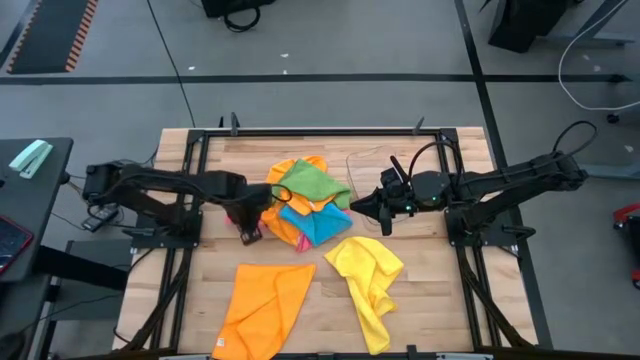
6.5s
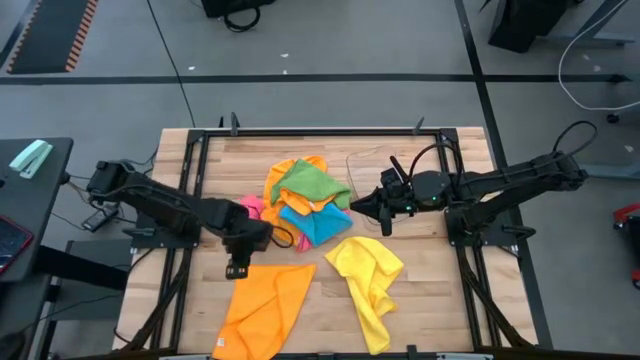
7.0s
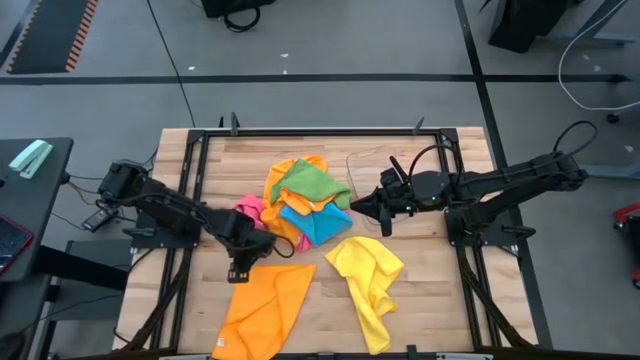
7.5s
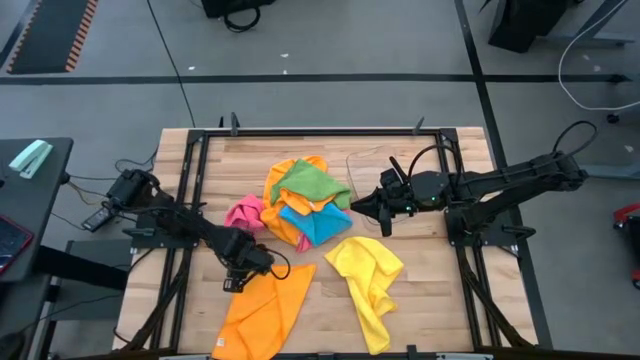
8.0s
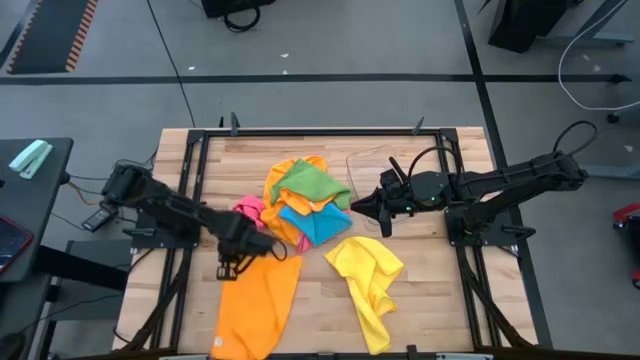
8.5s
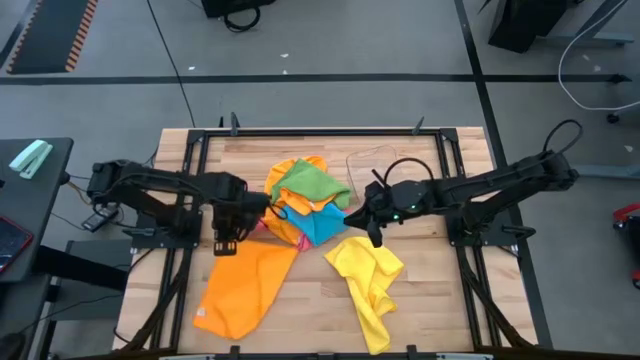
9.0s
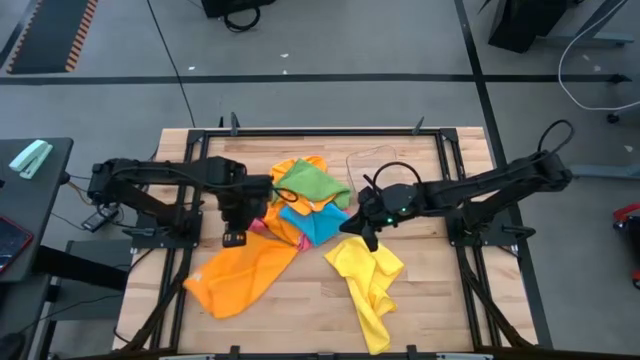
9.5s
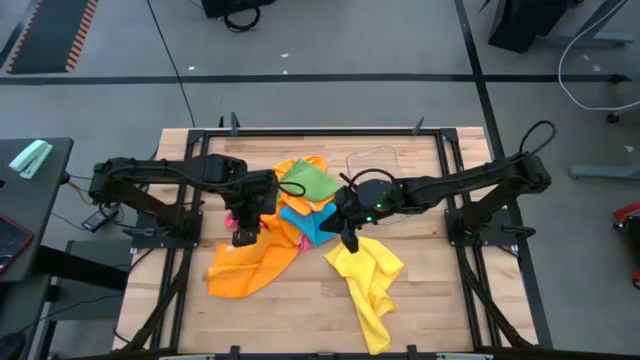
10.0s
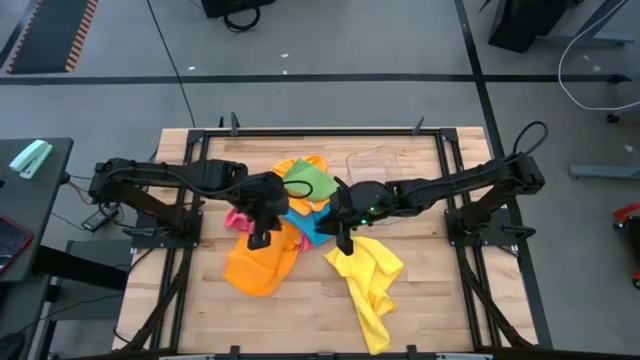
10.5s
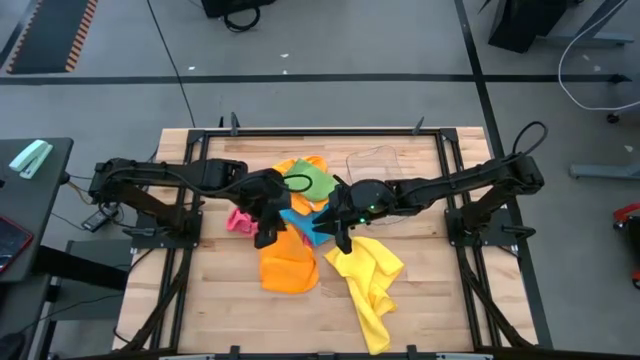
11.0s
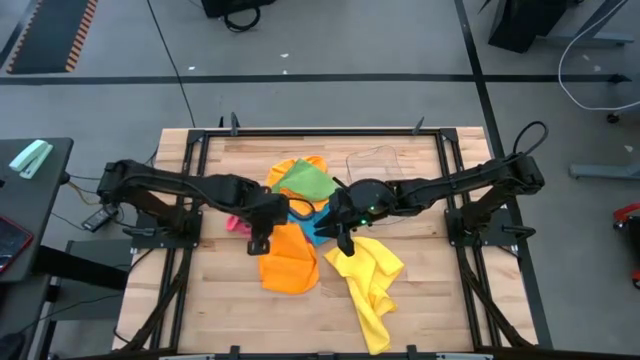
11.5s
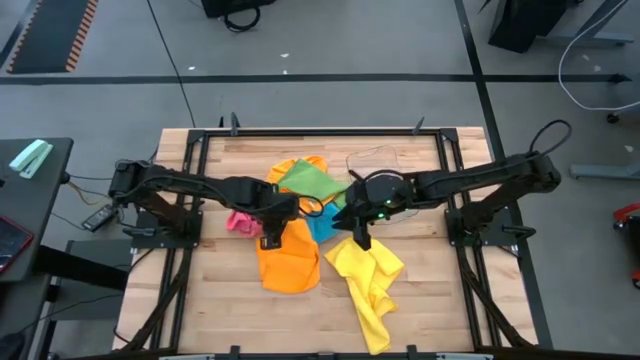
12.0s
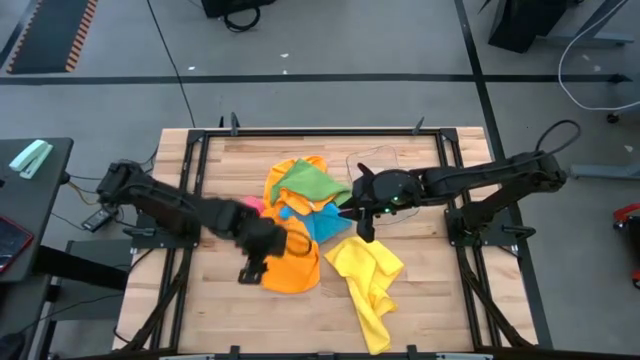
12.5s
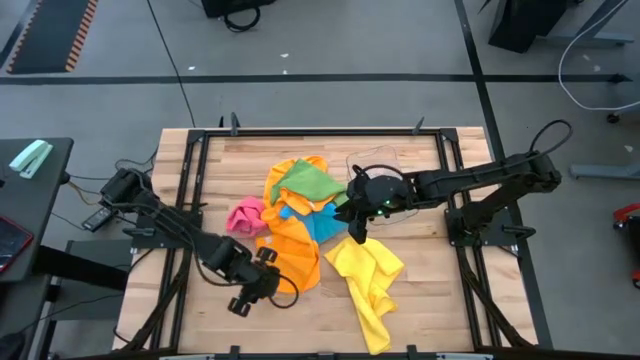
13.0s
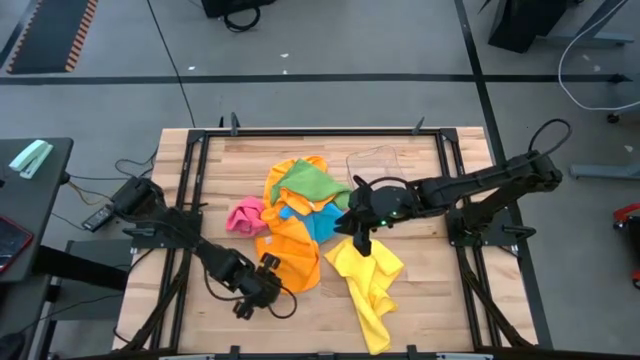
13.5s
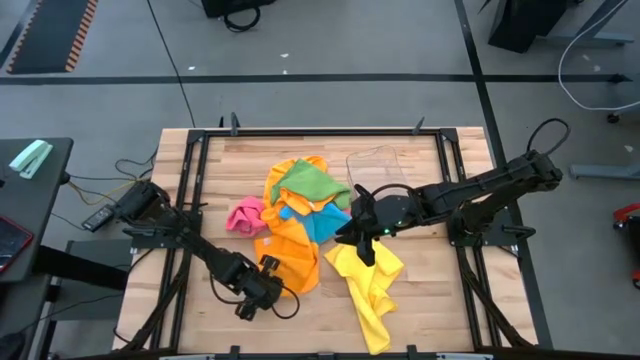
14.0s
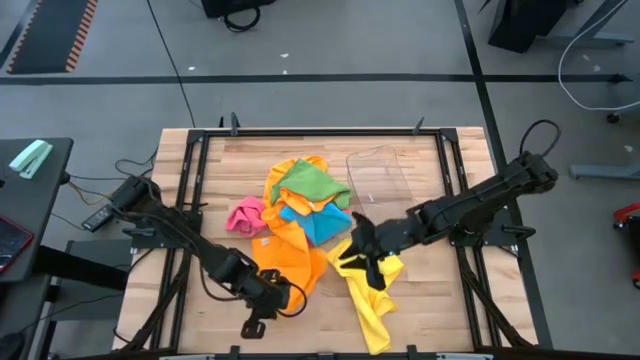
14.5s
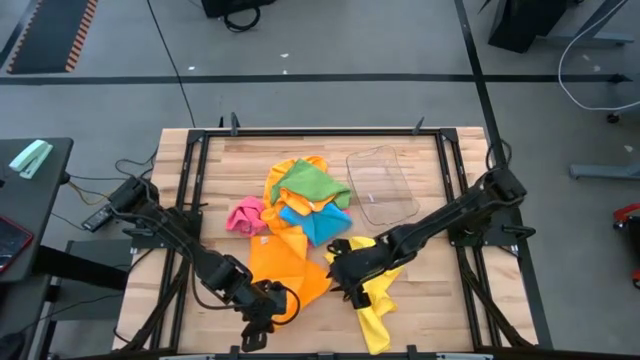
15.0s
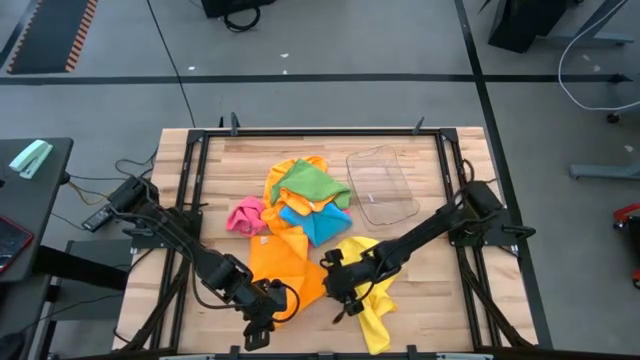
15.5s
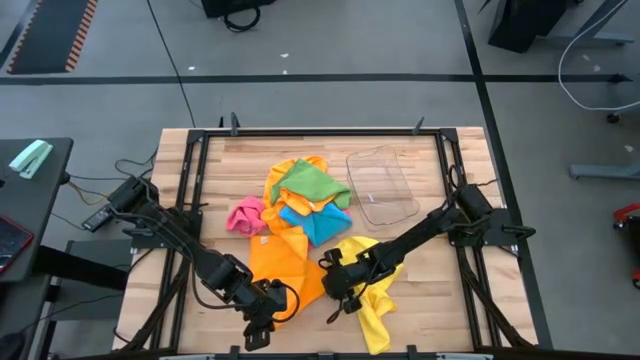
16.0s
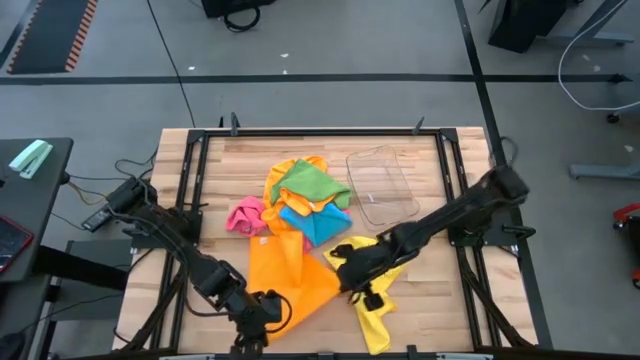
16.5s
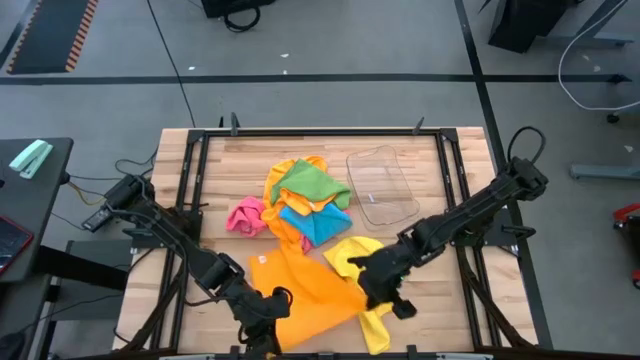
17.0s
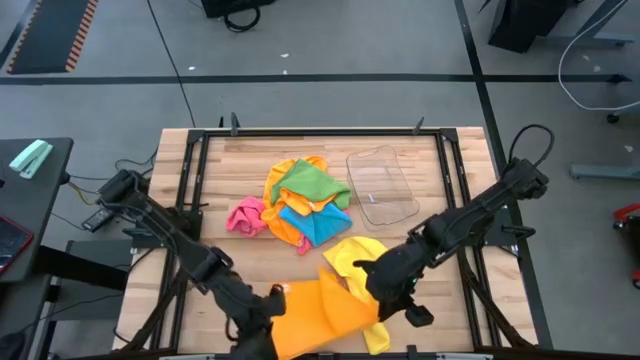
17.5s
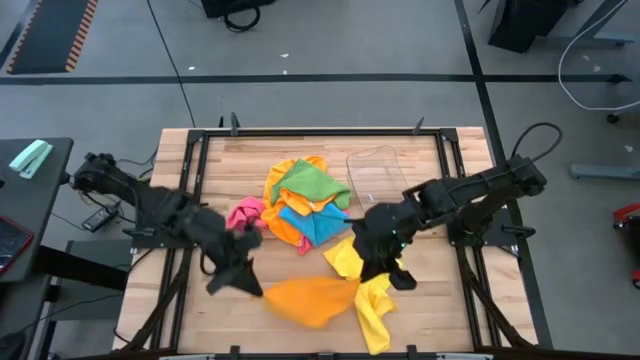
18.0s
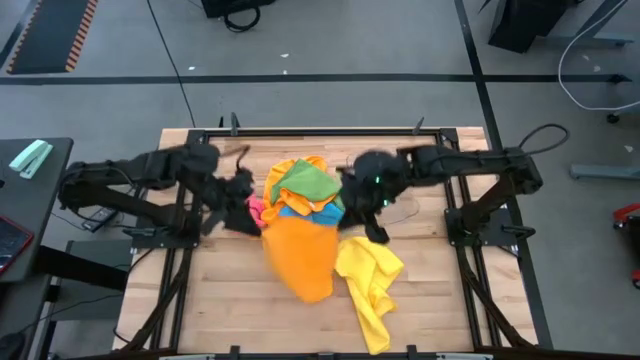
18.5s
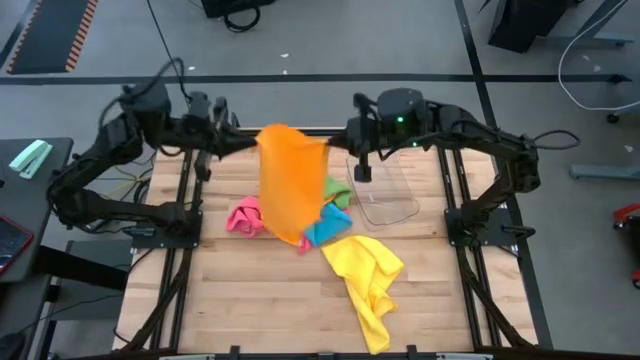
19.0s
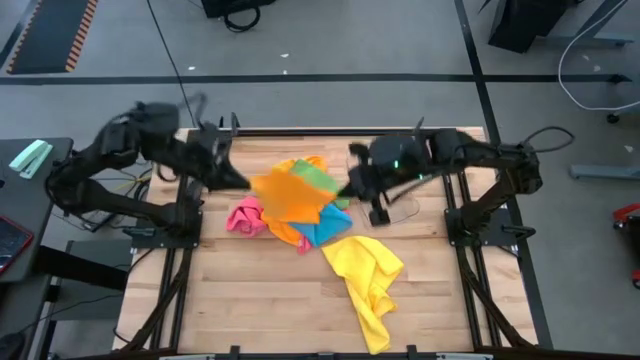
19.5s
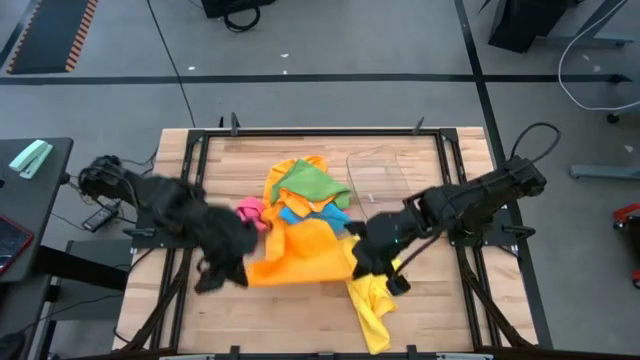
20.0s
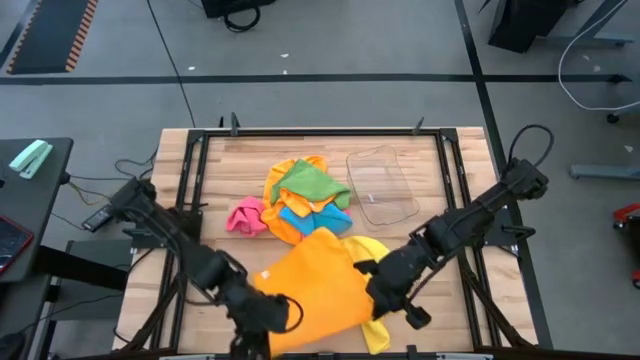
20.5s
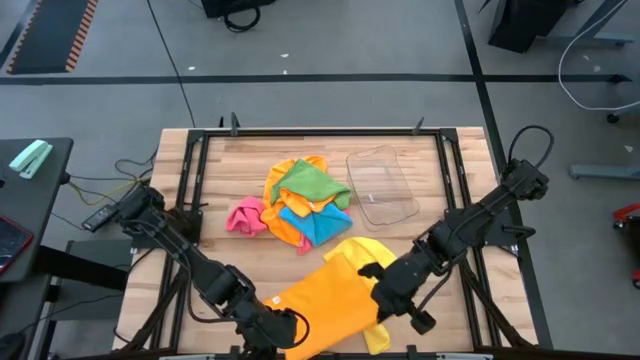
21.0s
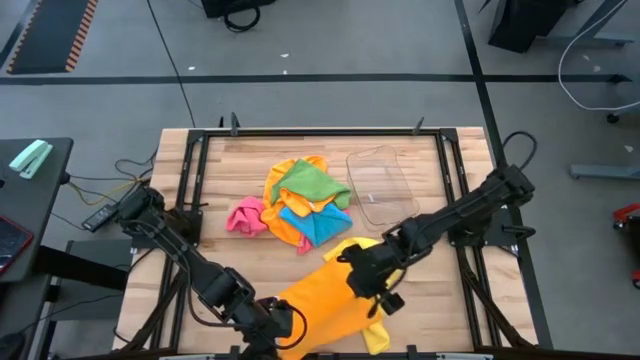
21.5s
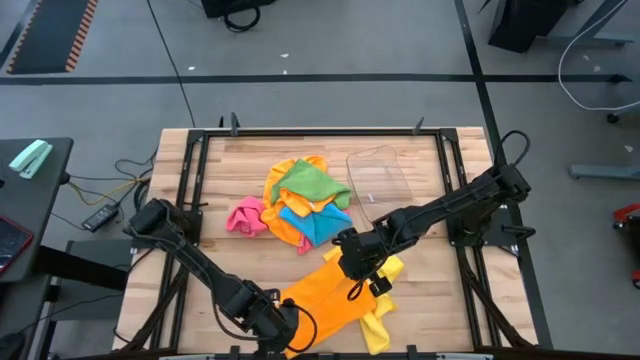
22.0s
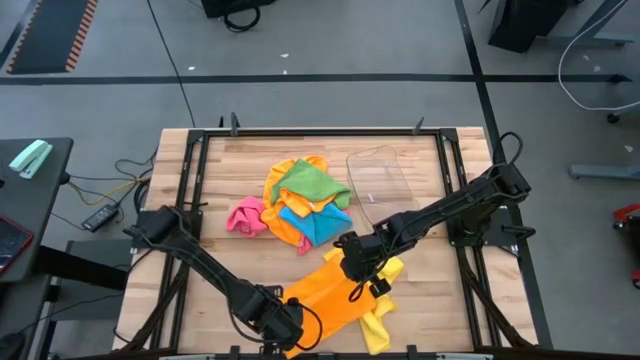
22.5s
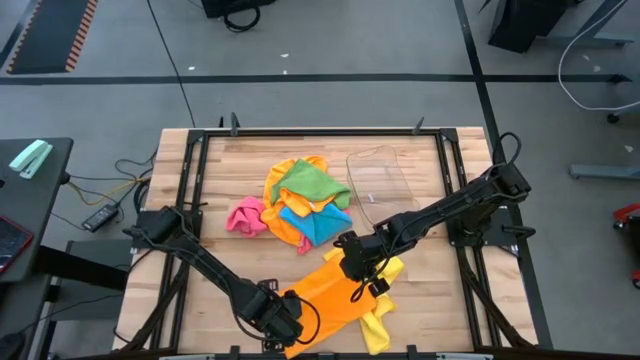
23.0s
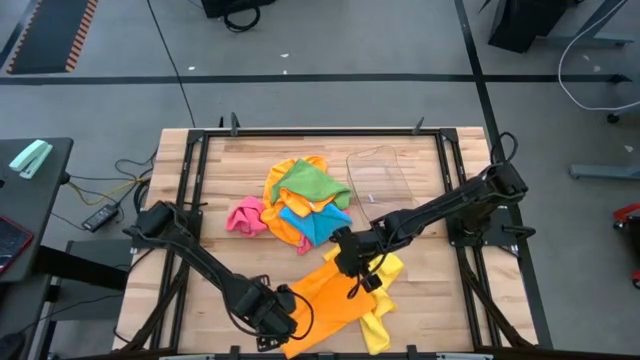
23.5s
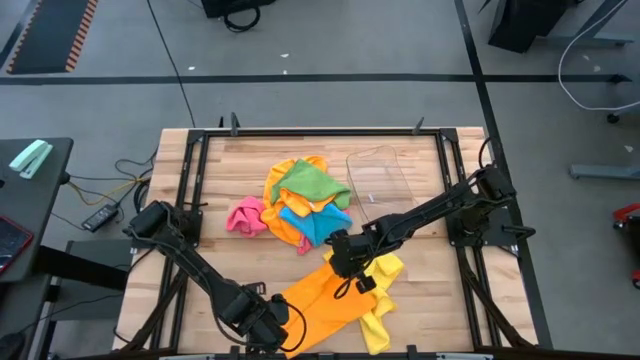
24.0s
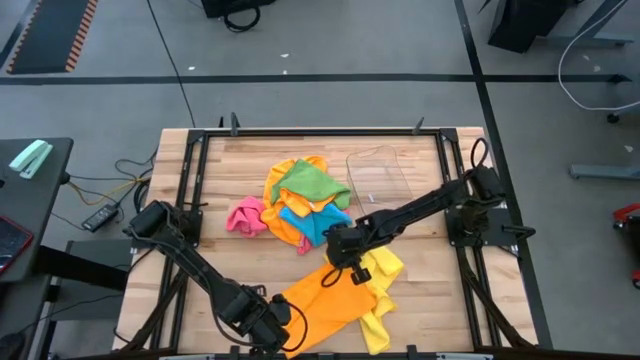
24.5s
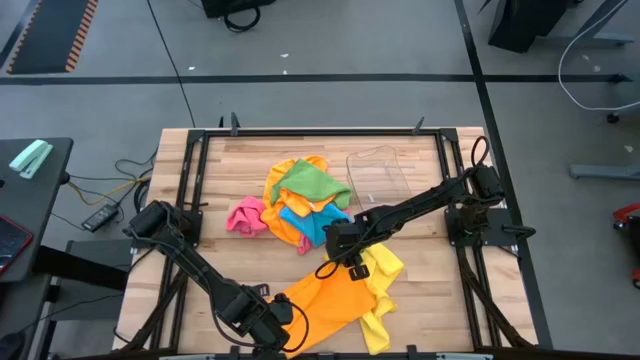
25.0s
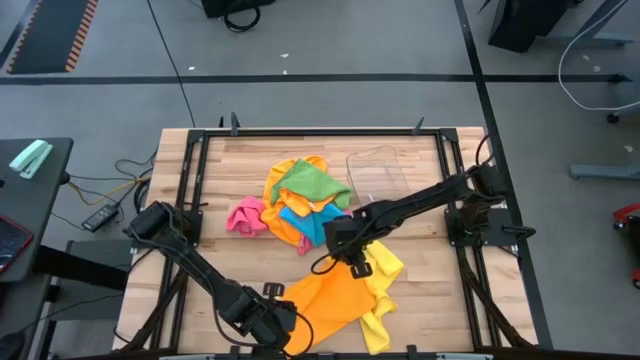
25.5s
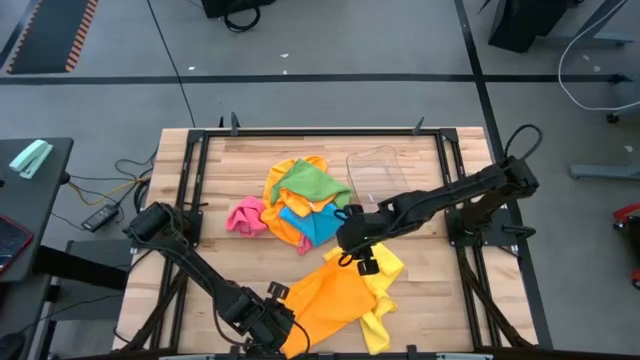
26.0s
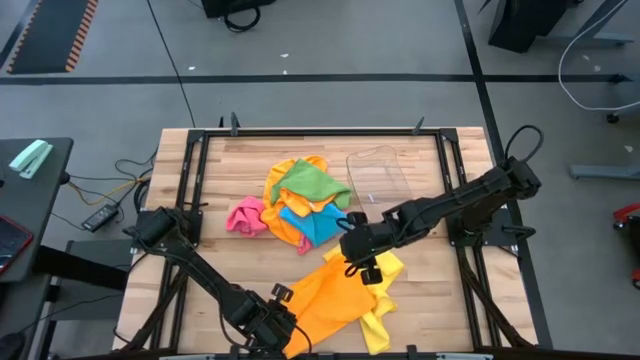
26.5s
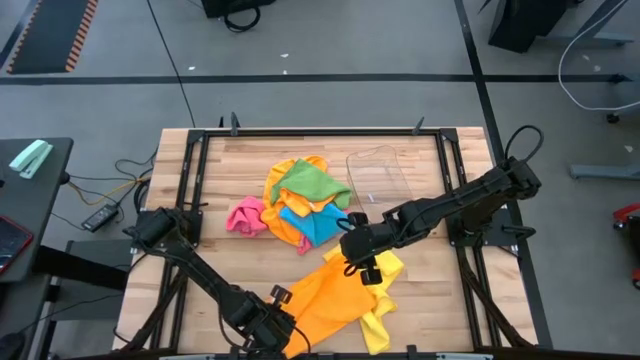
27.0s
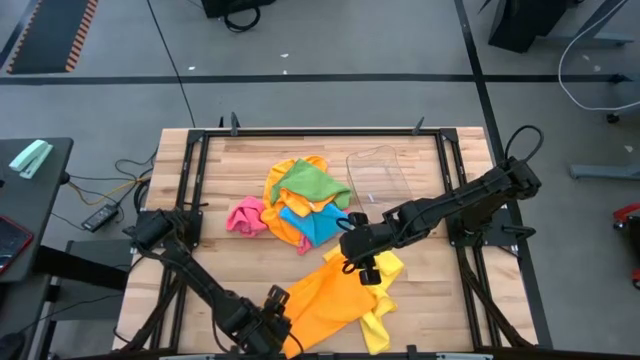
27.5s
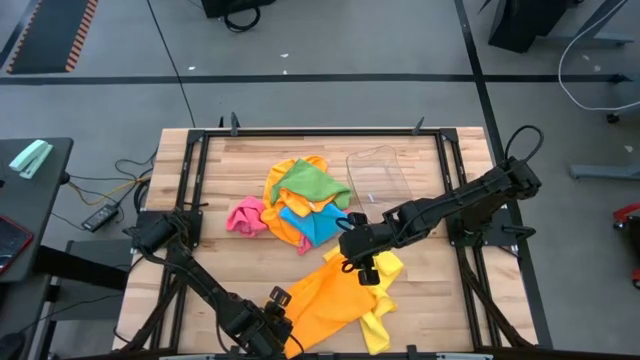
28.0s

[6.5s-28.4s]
Task: Fold microfiber towels
Fold the bottom orange towel
